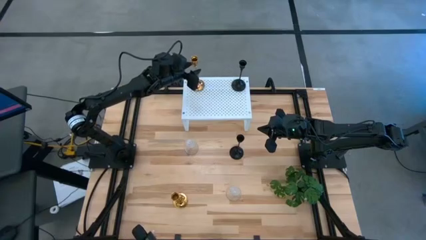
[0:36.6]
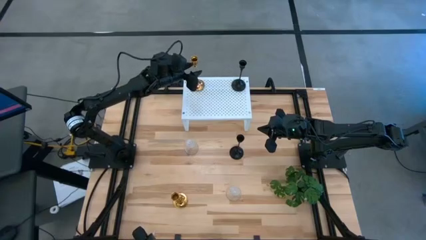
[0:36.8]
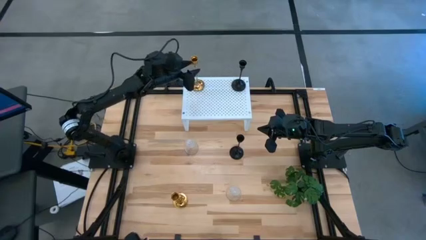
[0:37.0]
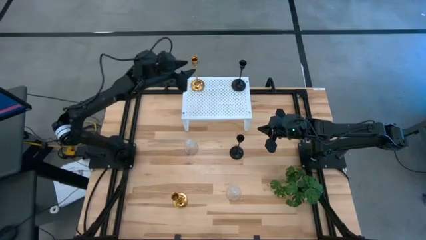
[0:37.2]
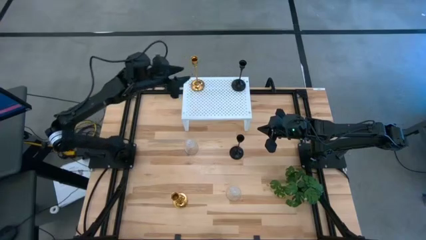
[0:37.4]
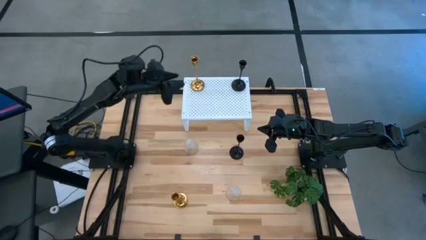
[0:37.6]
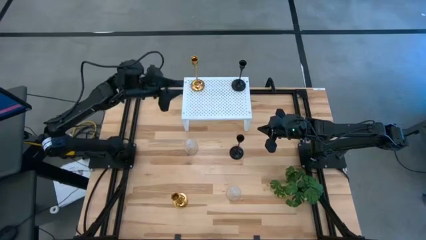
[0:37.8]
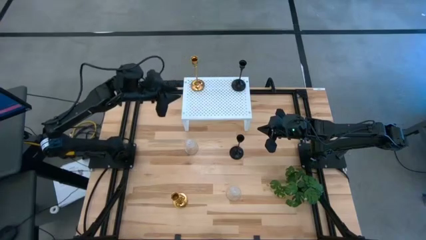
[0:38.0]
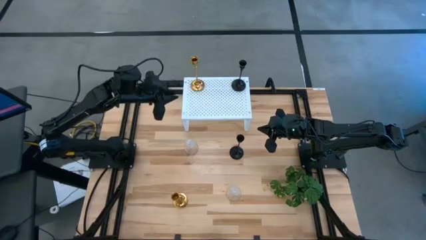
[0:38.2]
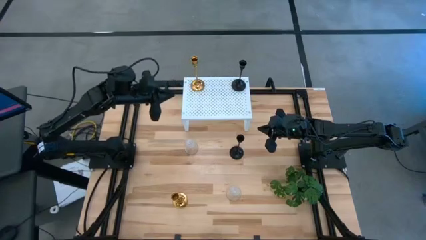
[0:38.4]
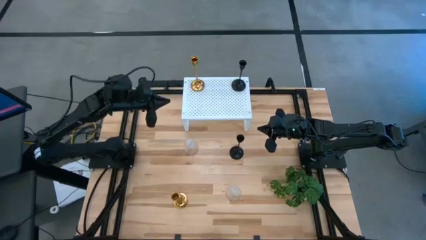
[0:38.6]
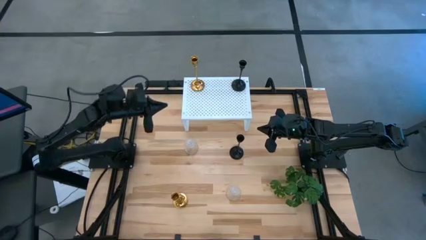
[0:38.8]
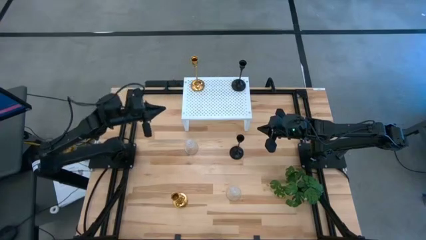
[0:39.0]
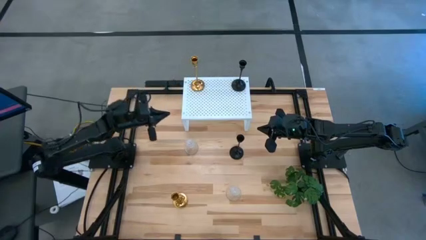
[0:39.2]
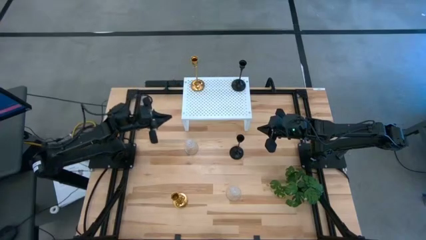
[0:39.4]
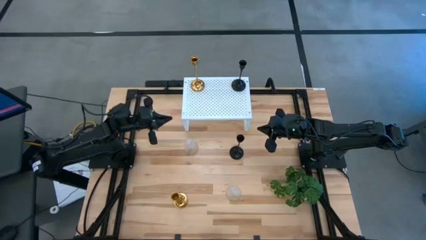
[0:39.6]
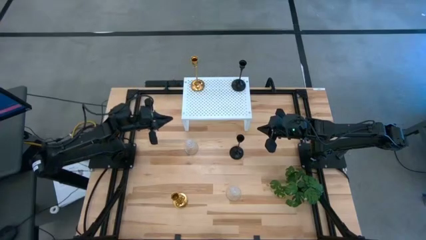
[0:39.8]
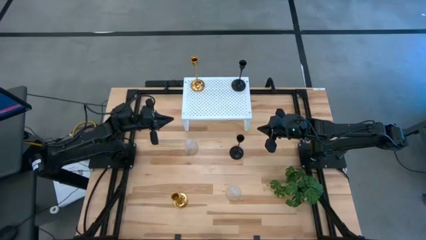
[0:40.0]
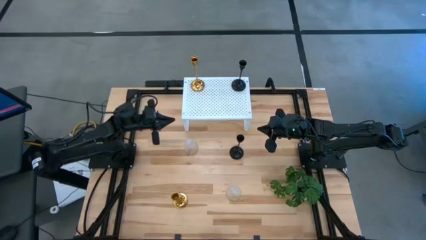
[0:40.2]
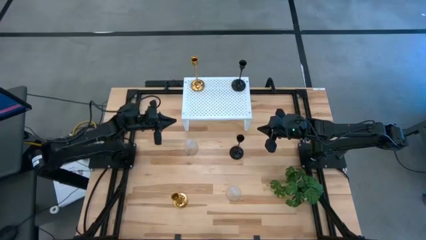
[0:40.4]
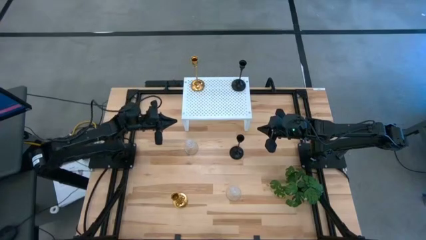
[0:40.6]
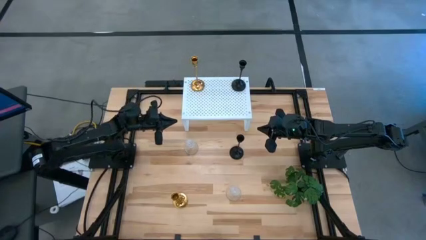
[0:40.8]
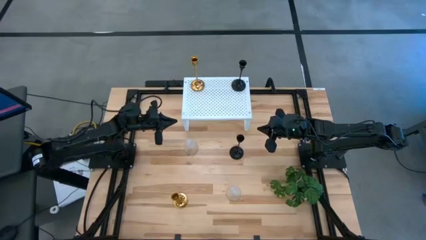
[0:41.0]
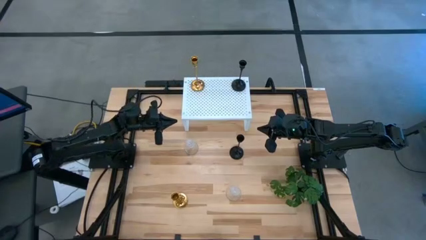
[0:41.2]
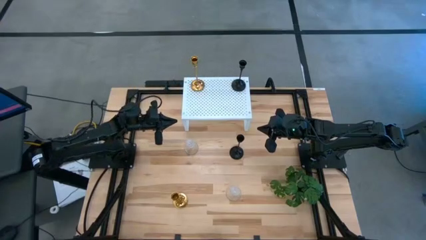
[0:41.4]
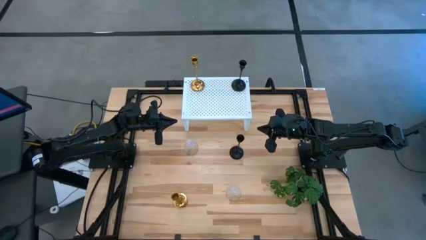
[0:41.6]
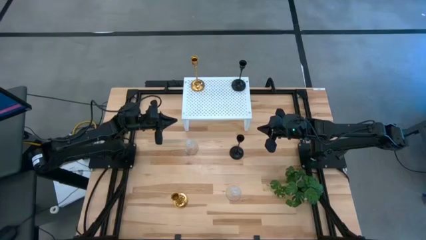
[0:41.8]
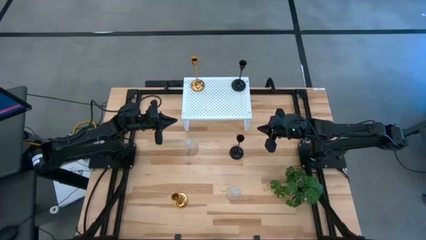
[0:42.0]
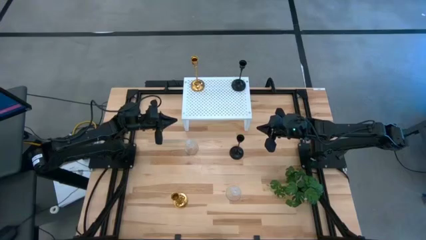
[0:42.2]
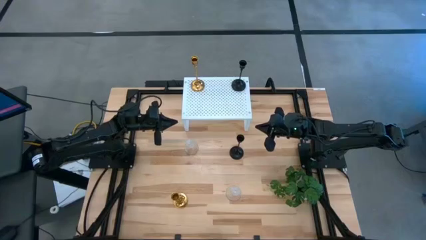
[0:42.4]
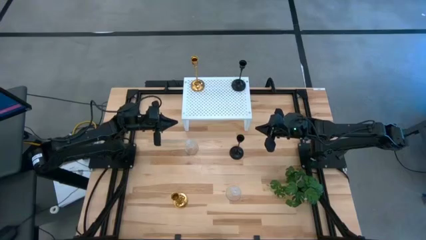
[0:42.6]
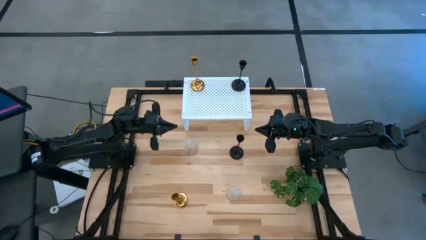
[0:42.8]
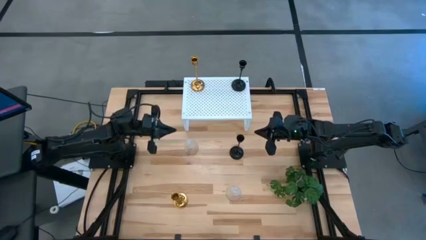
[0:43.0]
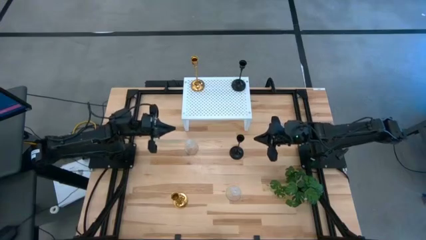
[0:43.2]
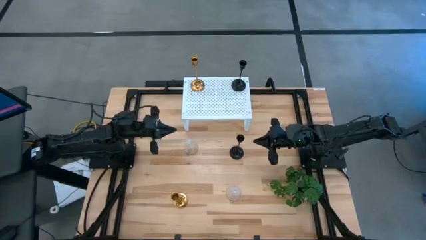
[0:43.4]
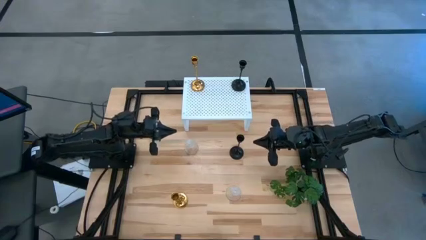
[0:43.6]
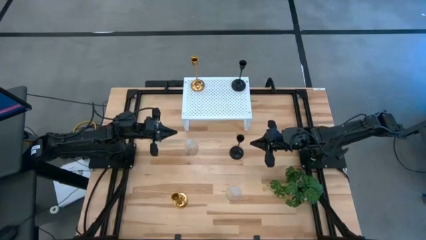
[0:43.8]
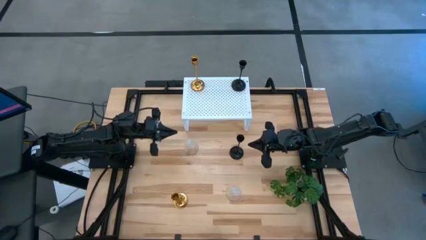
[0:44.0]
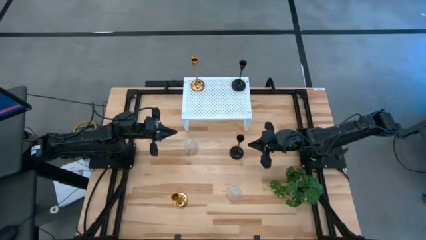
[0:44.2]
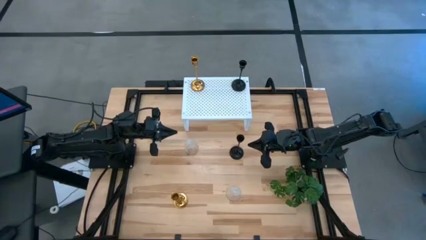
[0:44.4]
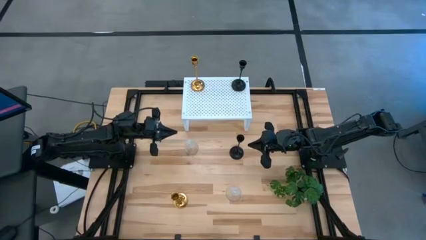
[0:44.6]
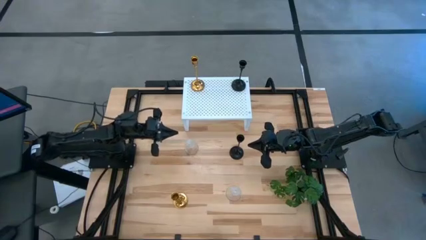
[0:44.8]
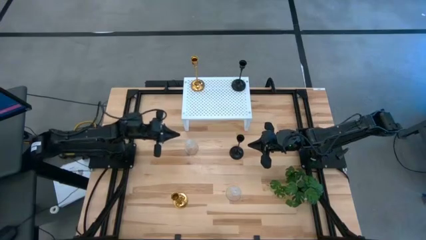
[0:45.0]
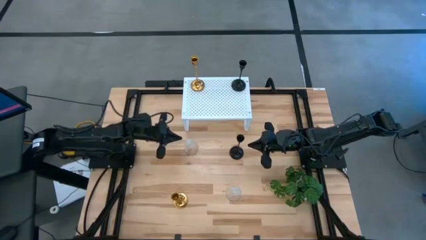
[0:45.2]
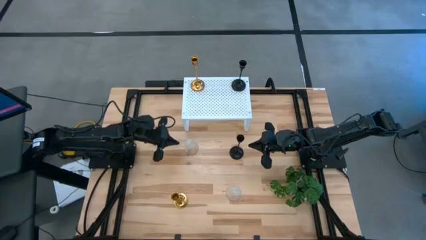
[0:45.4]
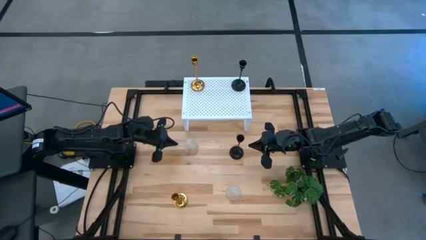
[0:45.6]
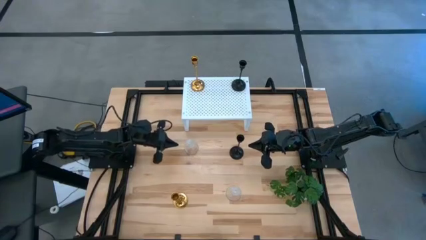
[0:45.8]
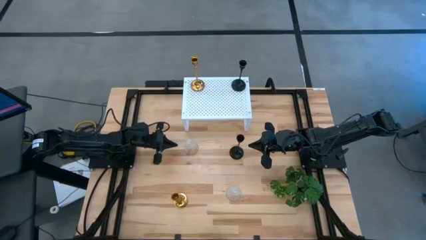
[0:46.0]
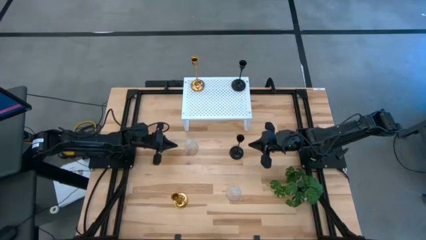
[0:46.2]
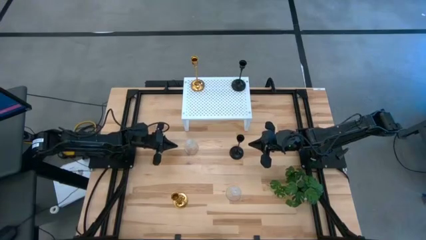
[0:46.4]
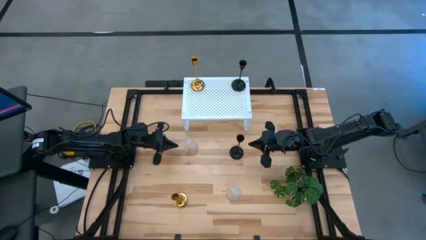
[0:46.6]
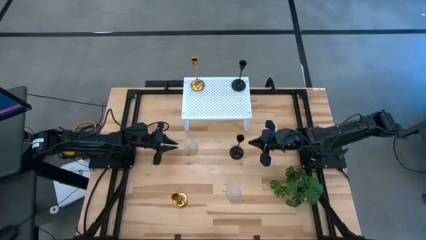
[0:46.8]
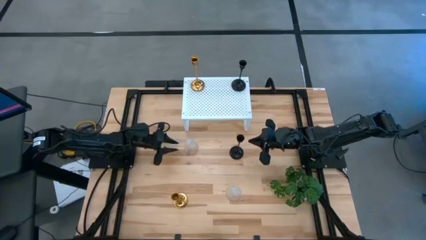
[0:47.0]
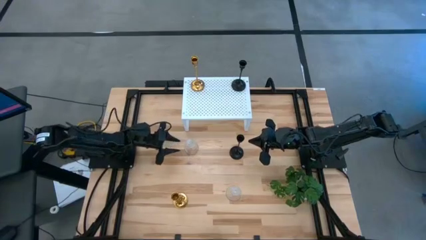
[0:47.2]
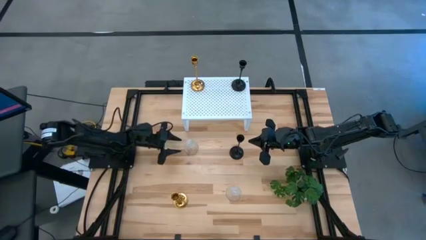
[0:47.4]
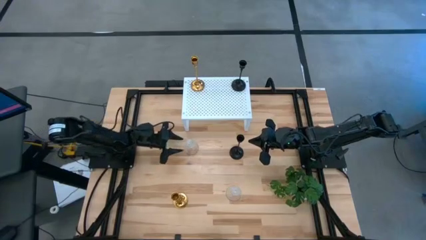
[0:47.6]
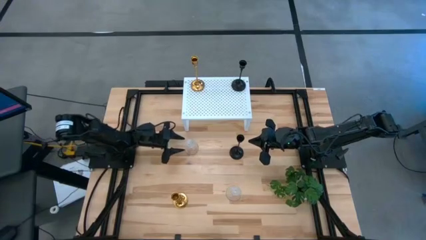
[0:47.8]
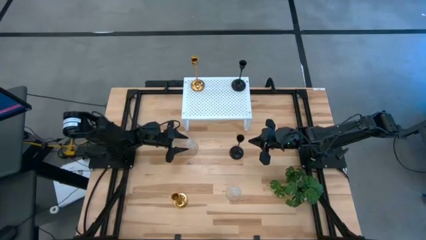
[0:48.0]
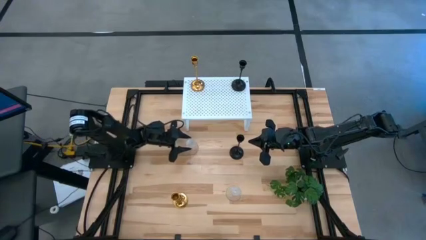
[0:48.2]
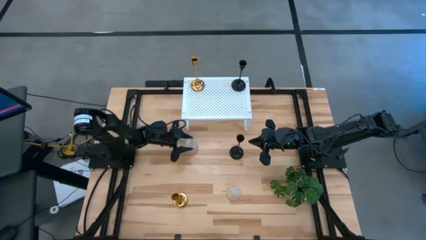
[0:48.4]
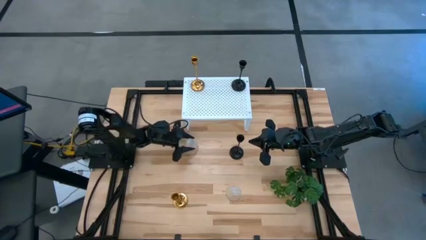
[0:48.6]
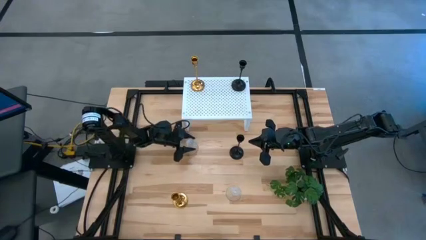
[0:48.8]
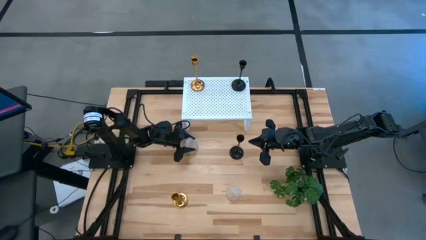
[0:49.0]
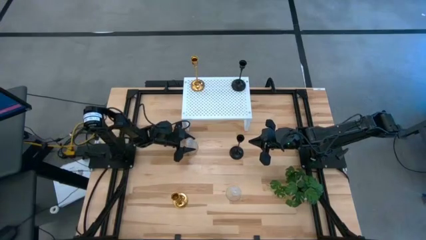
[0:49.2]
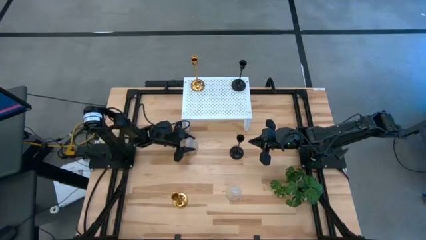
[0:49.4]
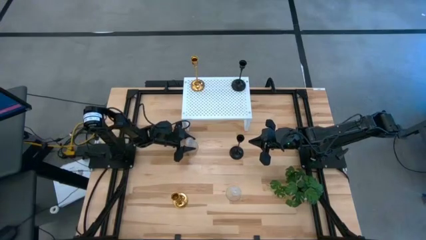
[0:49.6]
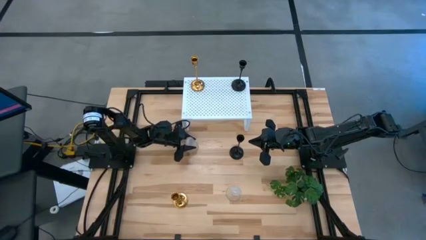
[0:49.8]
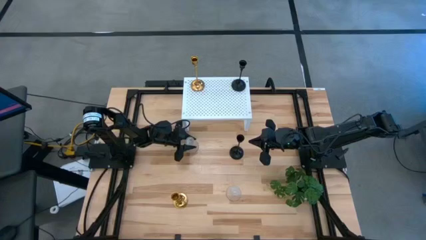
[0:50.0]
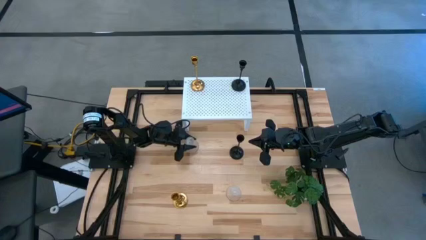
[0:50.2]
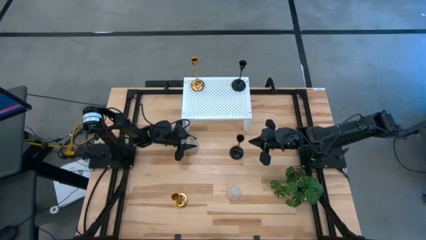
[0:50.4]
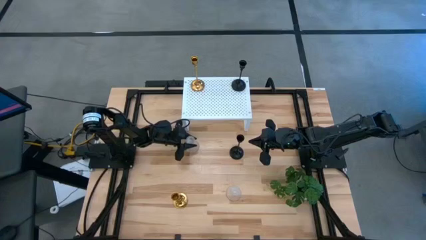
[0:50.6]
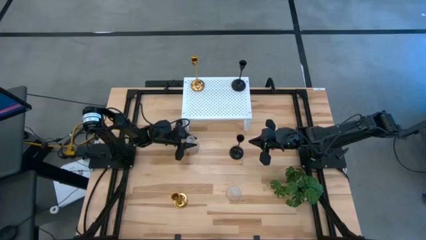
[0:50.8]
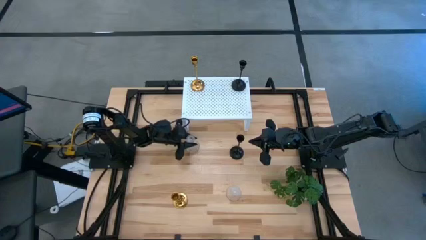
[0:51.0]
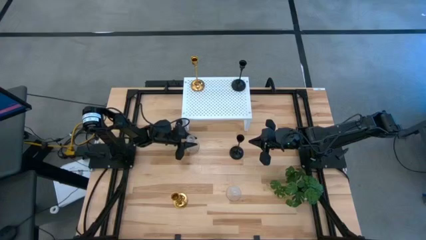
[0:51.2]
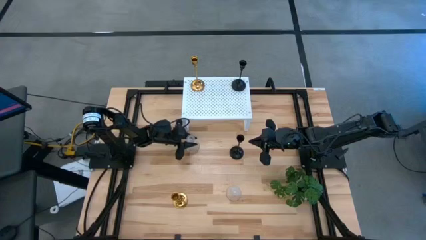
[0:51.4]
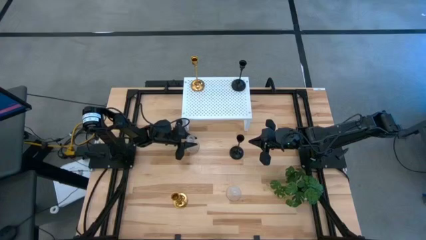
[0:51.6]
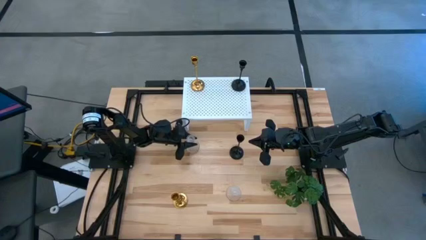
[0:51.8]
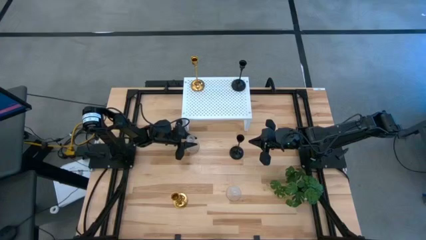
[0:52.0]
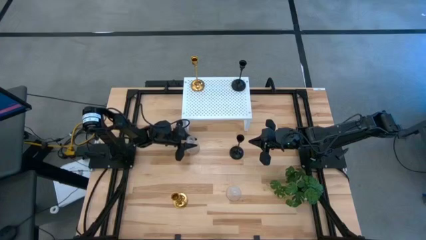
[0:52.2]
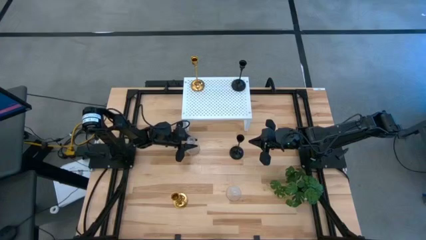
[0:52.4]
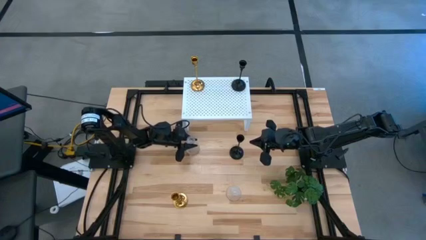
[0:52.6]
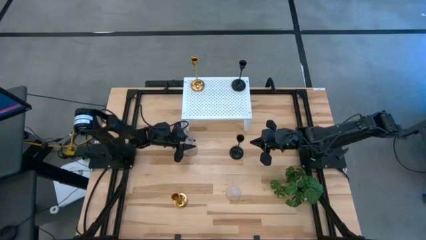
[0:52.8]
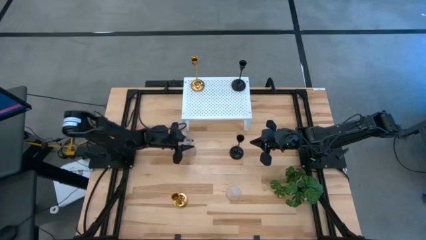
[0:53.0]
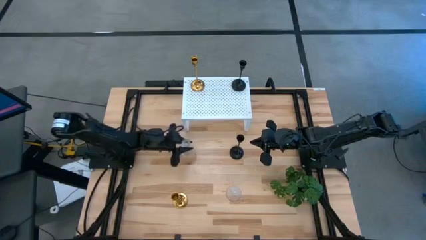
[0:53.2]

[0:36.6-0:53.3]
Task: Pick & Place candle stick holders
Put the top transparent candle holder on the shelf
